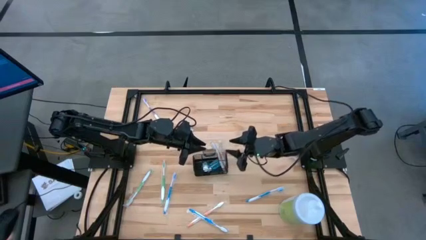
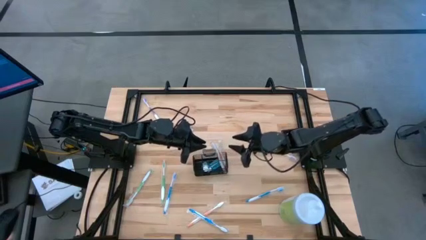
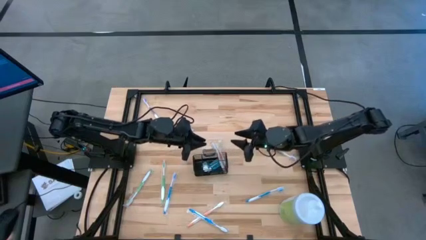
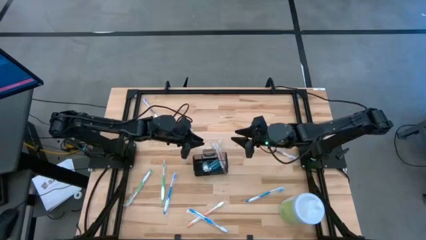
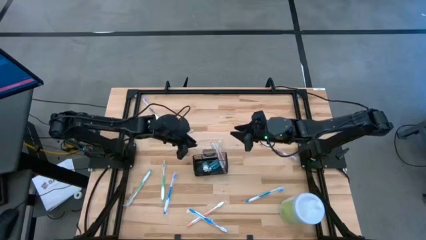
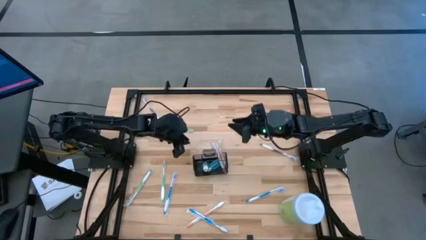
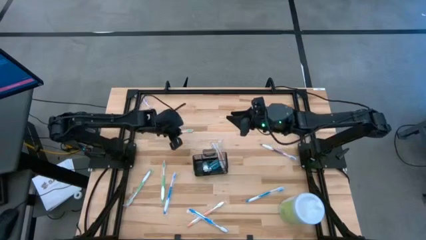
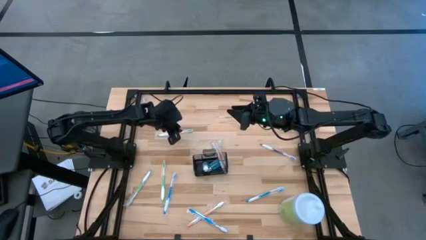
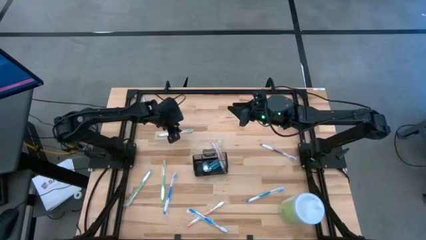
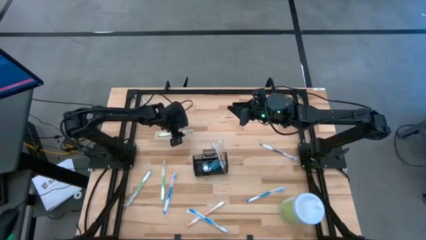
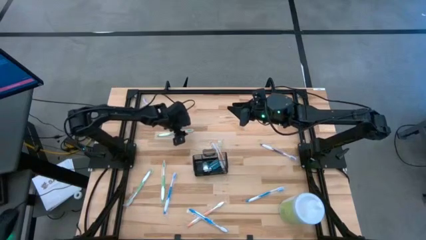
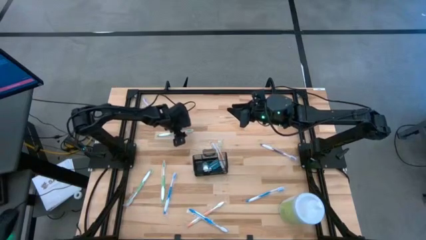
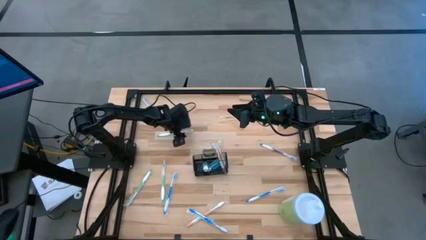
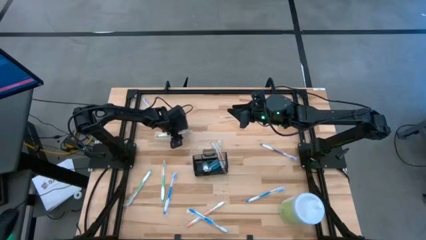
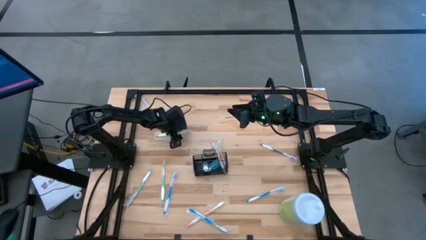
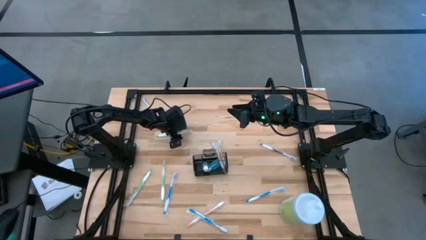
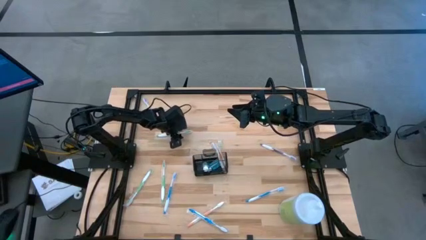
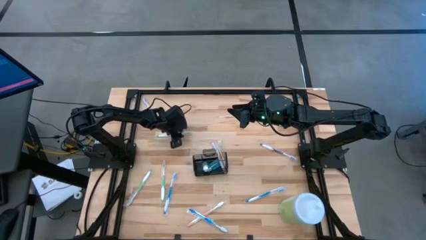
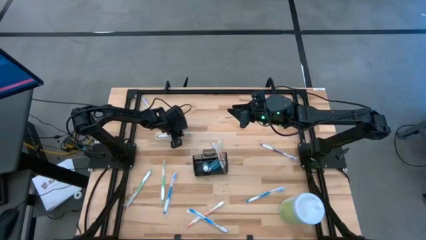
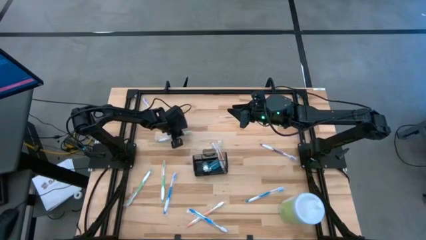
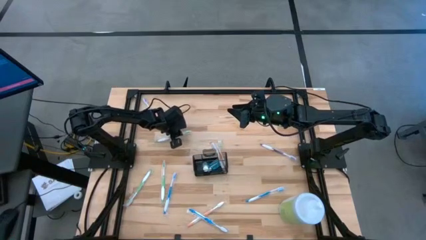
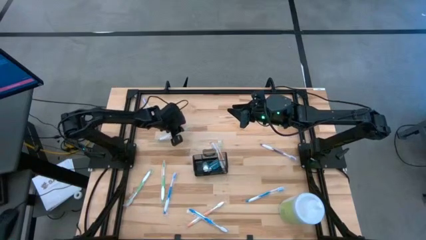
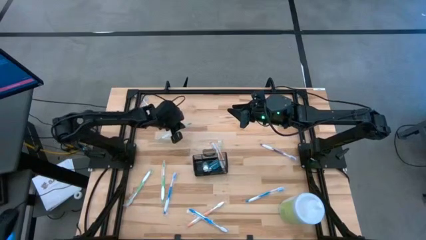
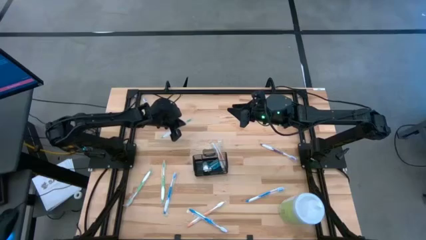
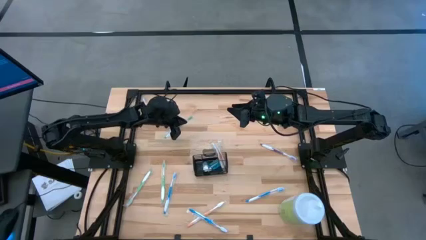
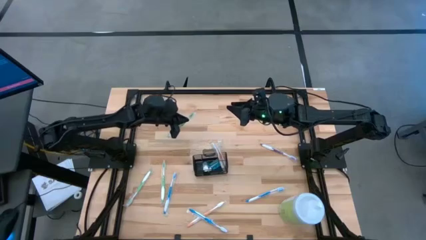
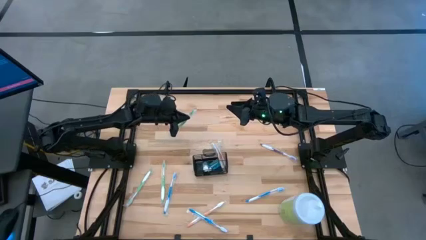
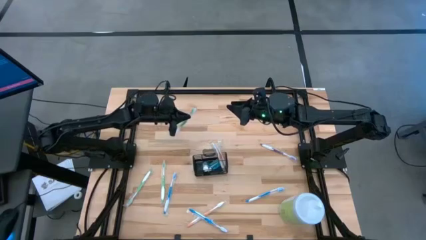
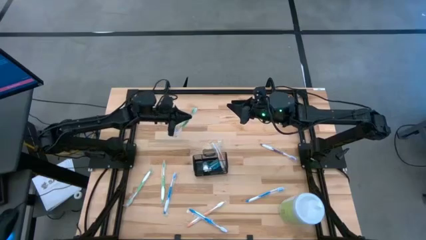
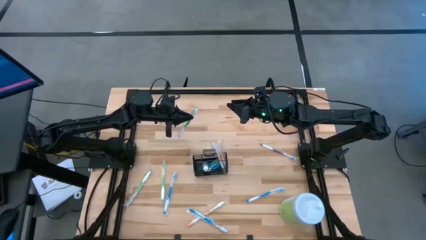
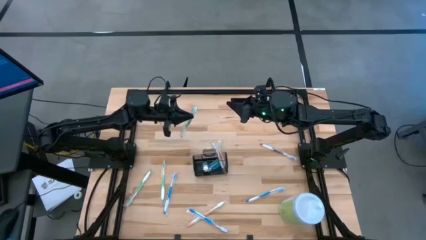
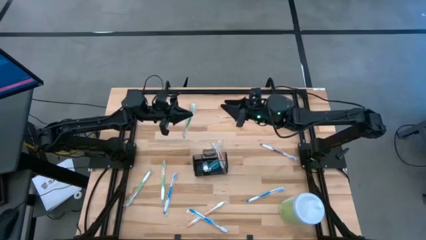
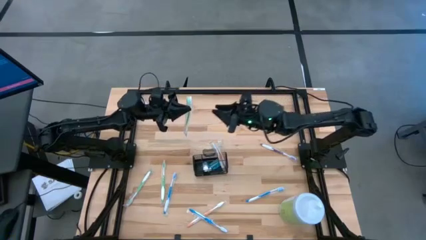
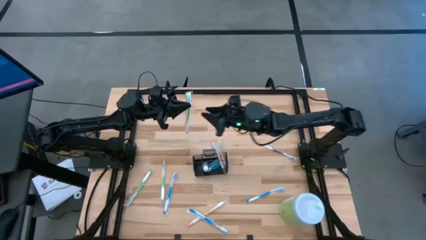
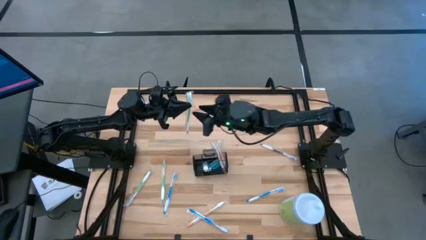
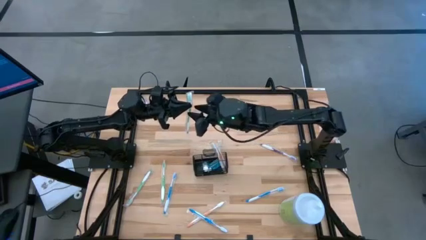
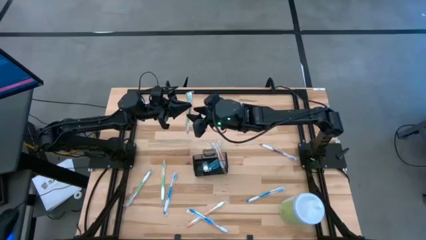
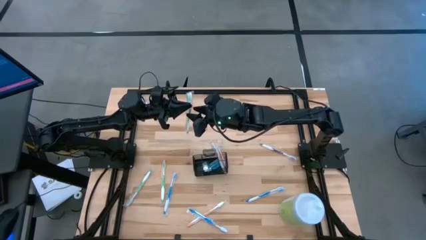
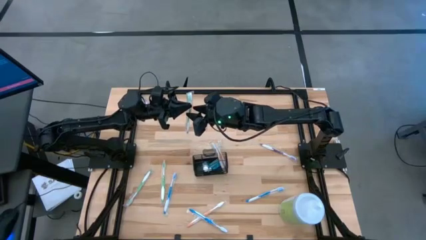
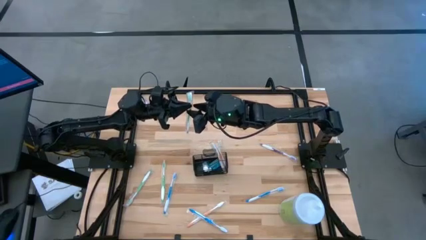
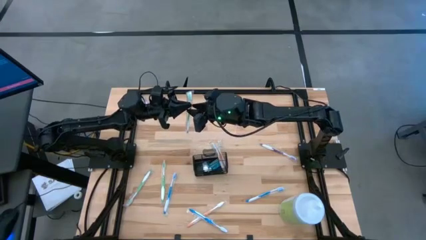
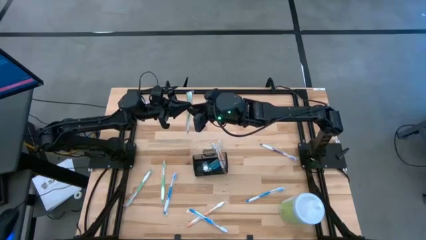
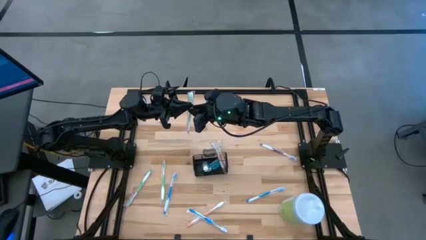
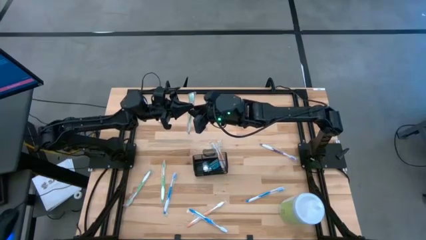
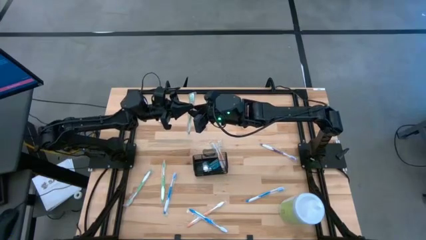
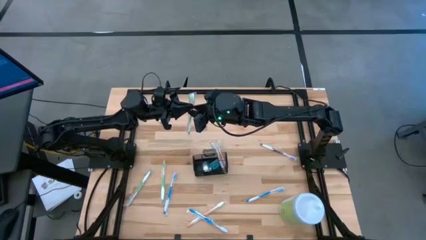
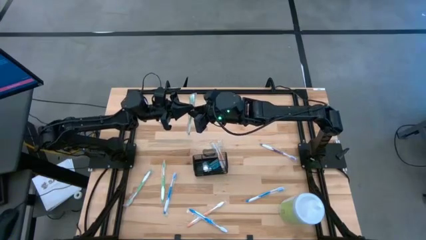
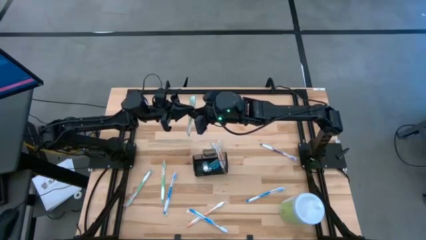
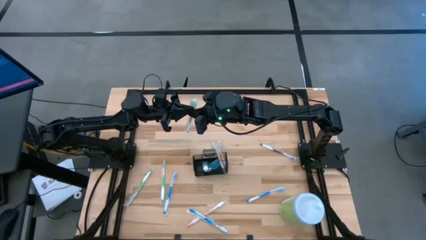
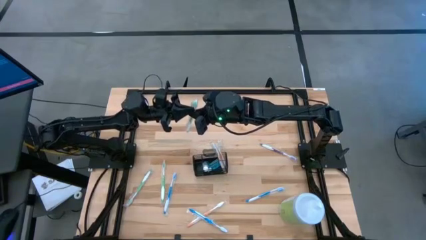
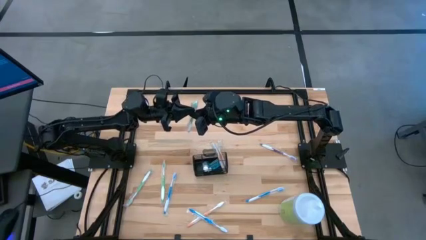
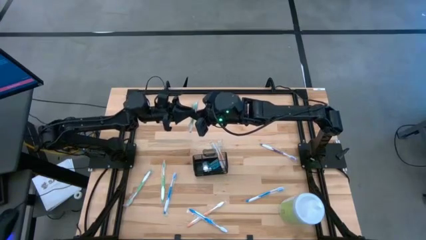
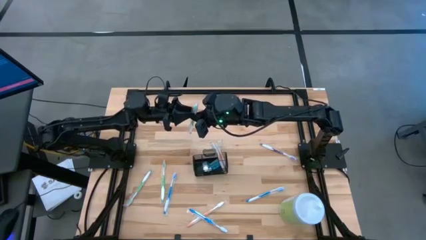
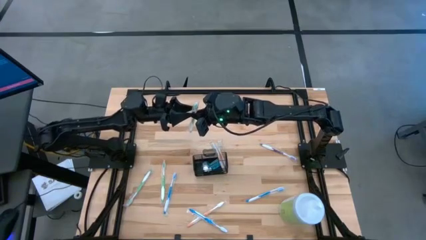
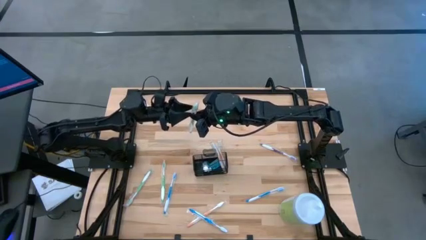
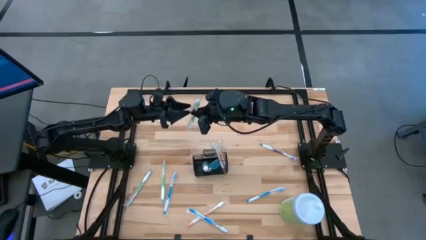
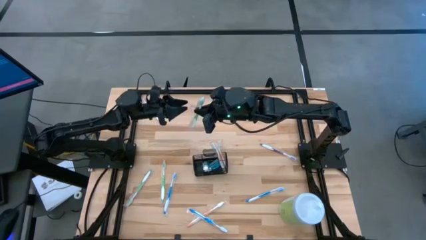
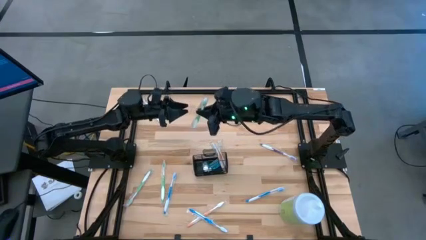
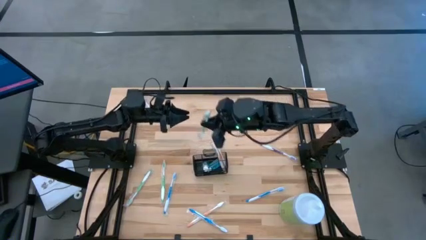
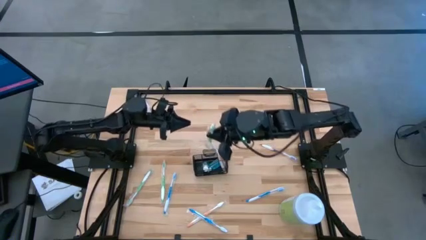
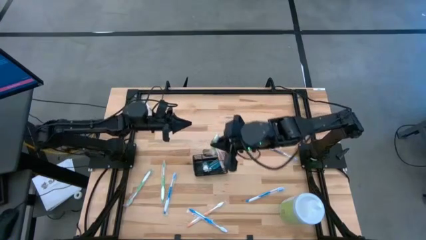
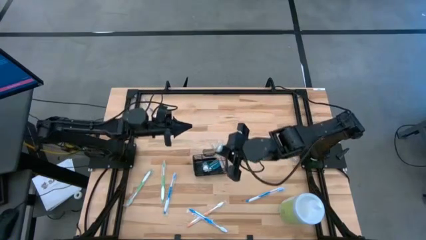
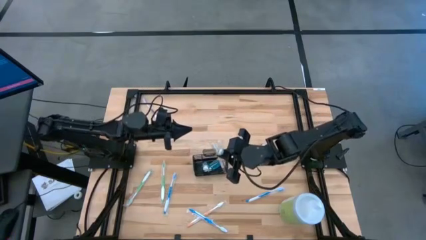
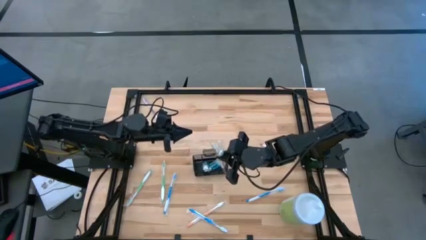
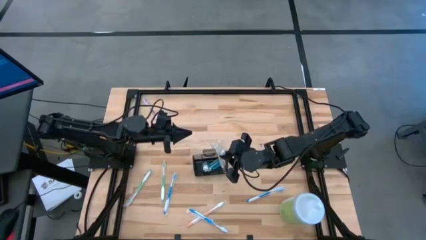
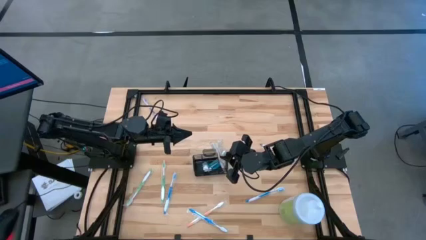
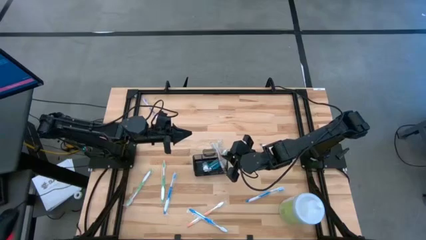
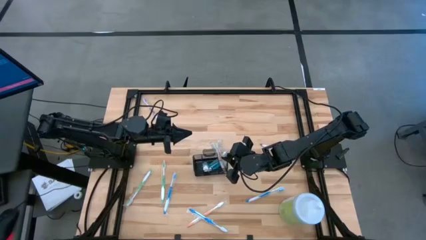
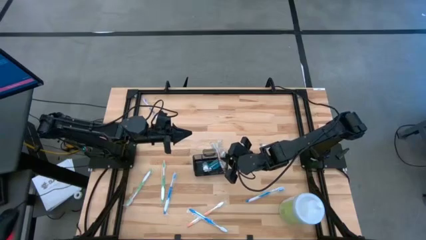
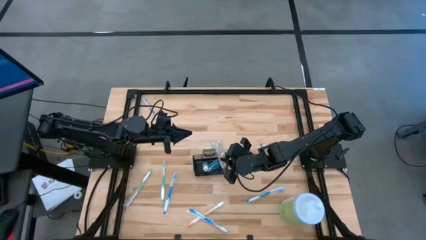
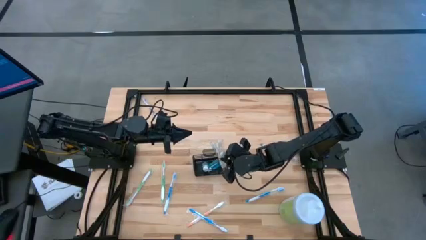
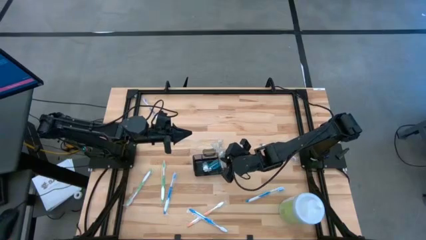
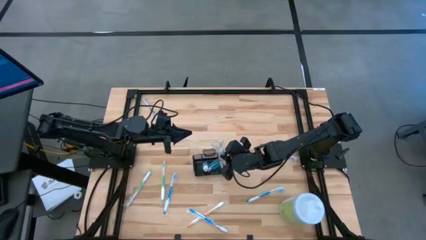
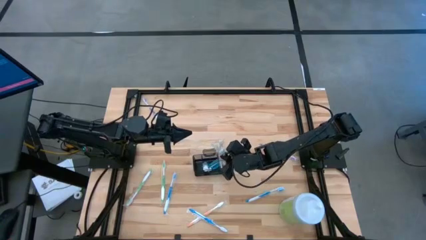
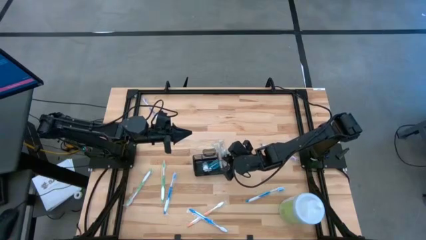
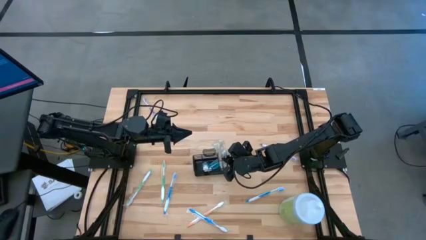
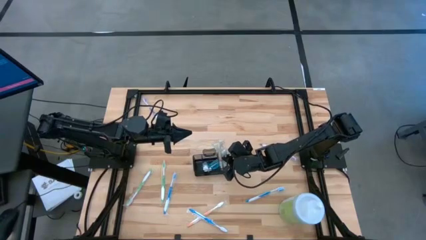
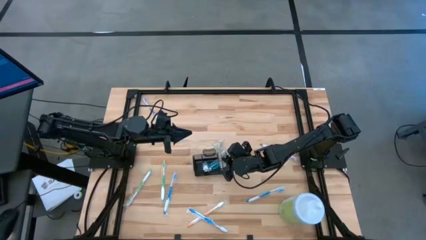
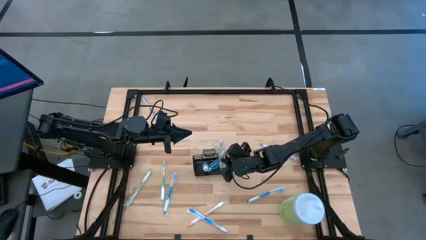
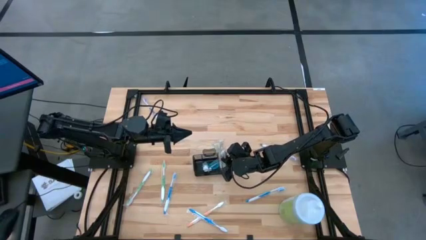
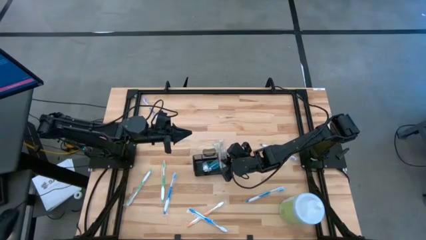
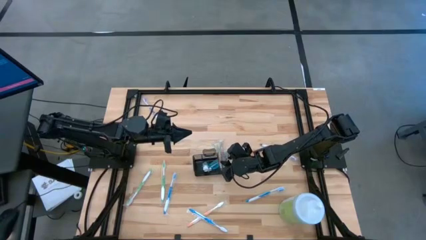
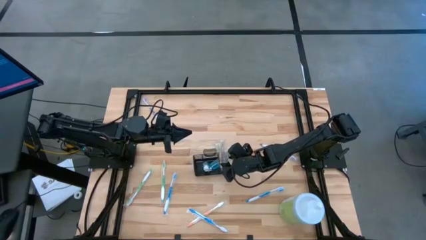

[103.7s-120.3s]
Task: Pick & Place toothbrushing station
Put the top right green toothbrush into the bottom right section of the mesh organizer
